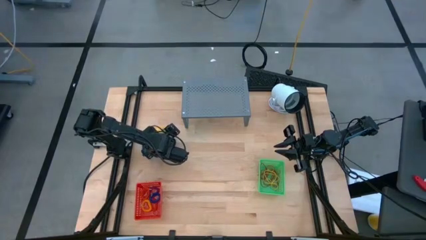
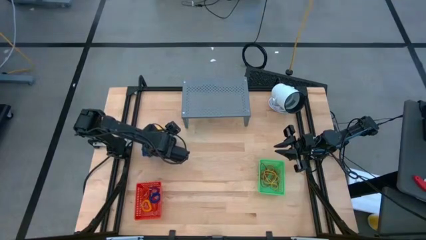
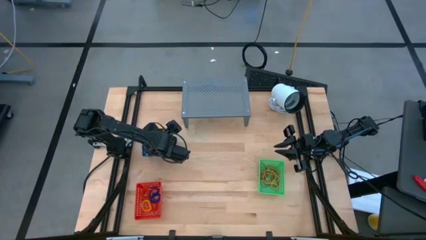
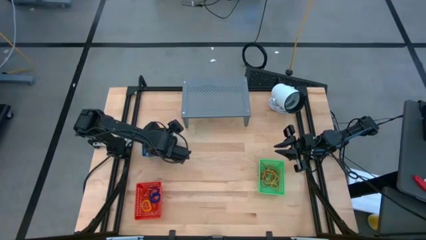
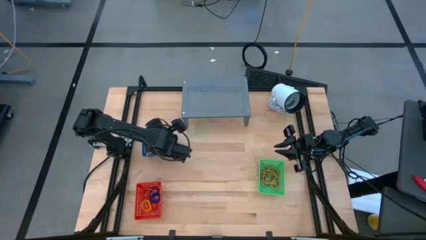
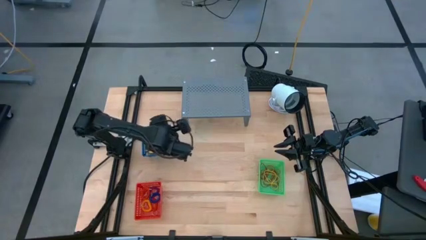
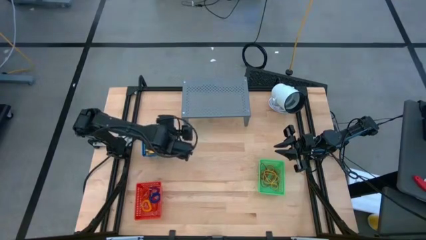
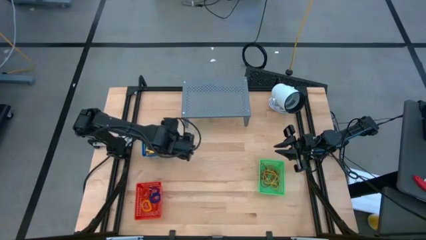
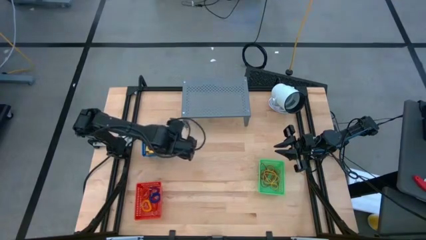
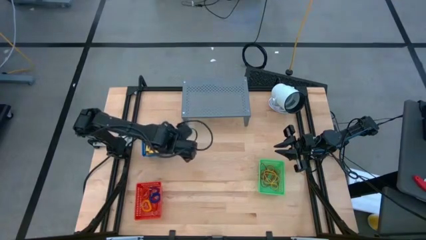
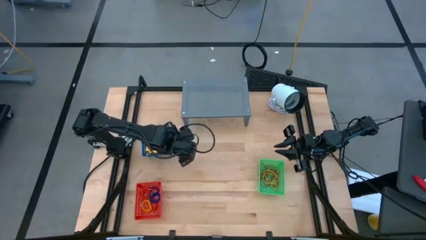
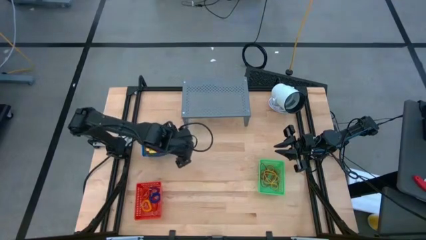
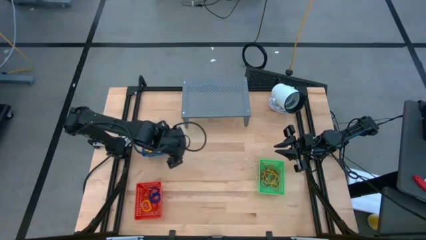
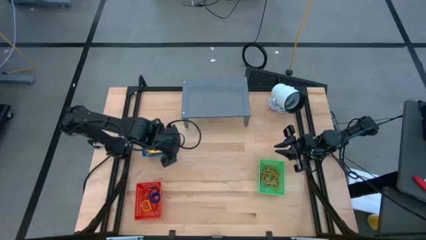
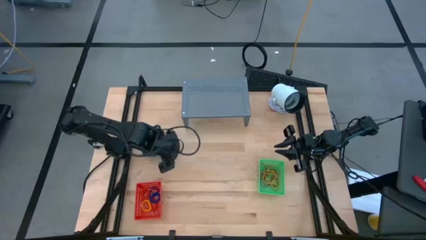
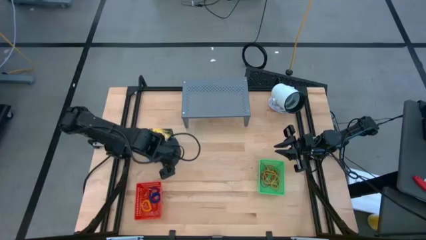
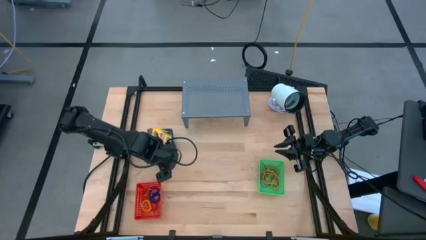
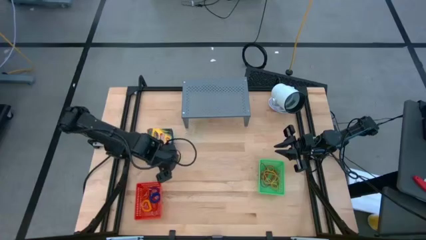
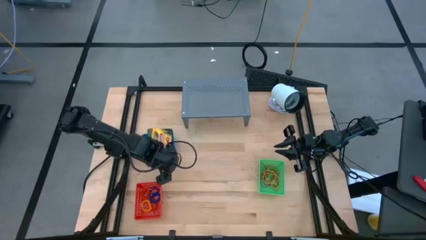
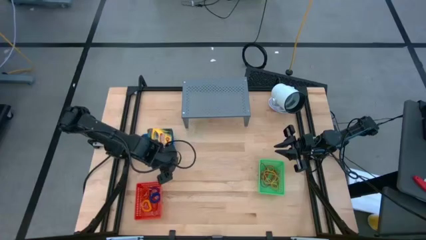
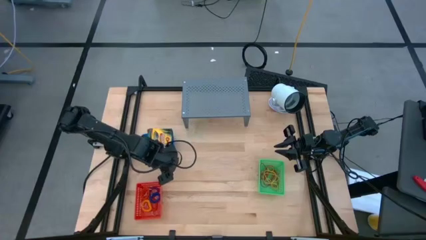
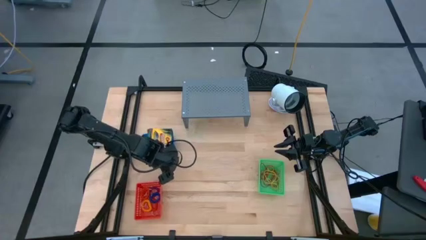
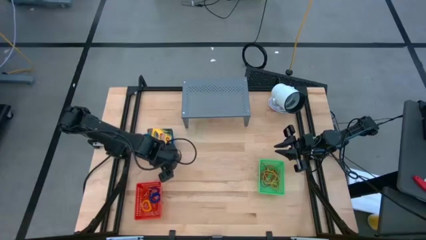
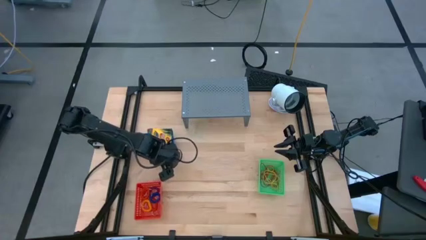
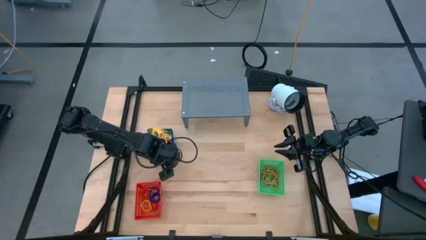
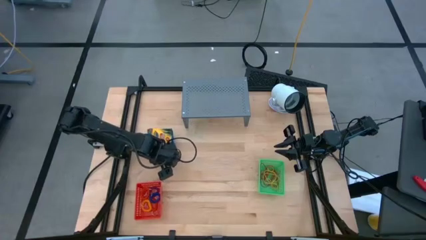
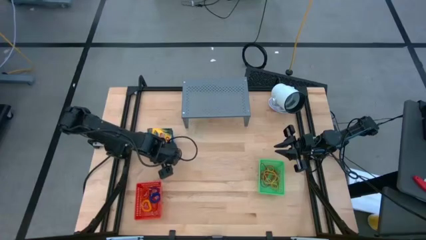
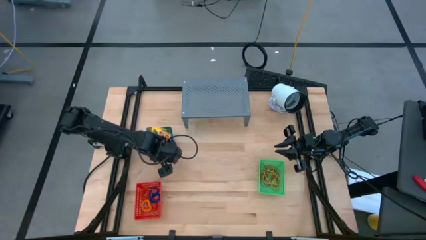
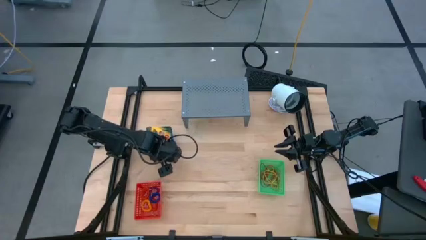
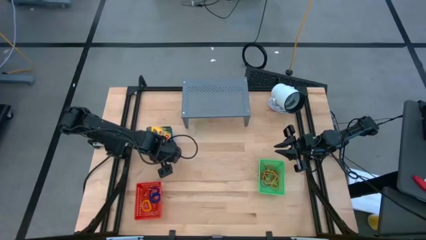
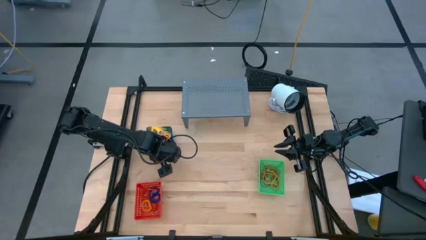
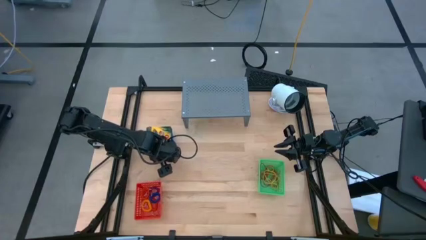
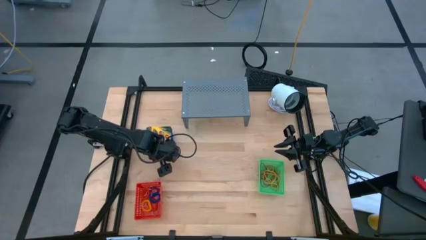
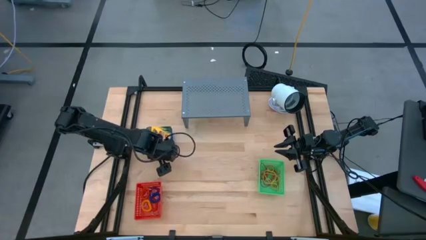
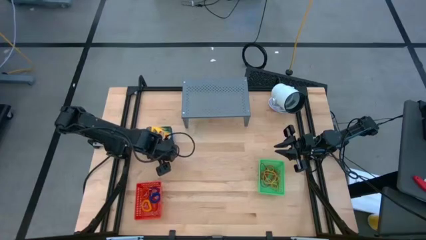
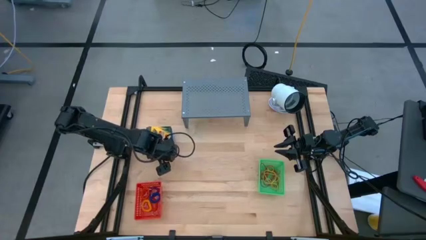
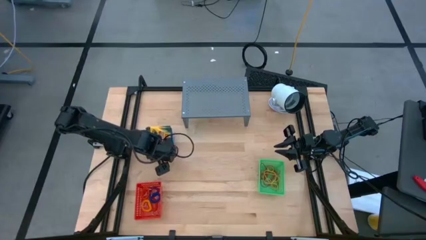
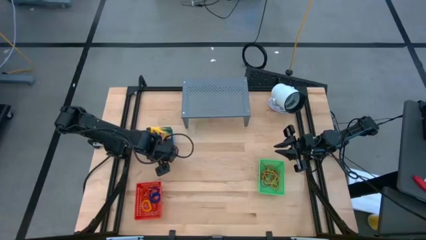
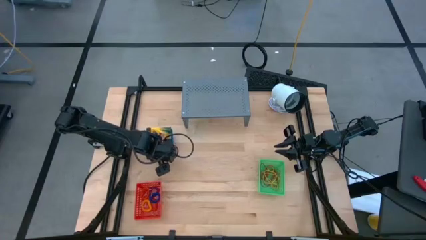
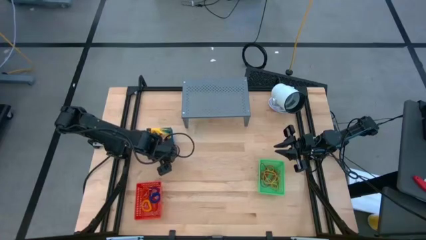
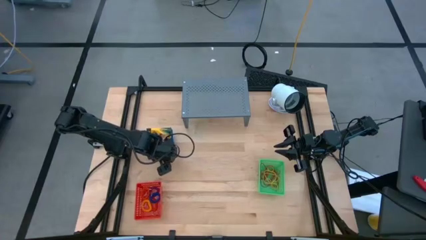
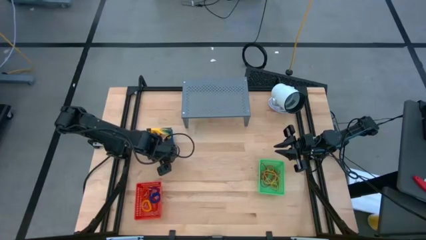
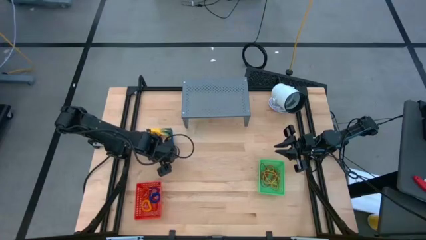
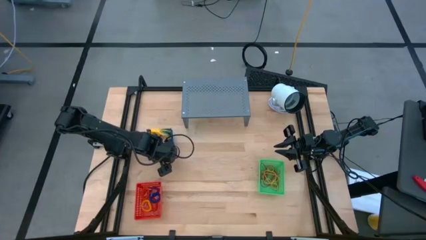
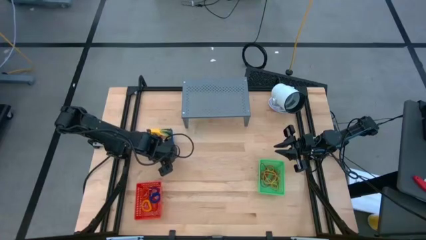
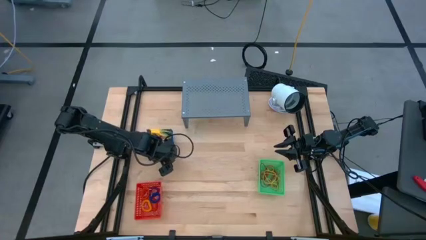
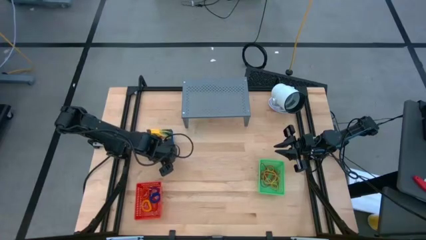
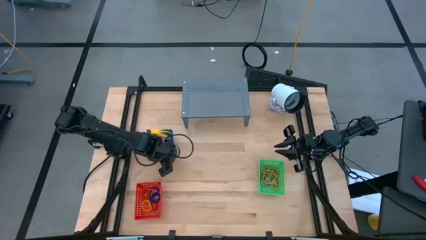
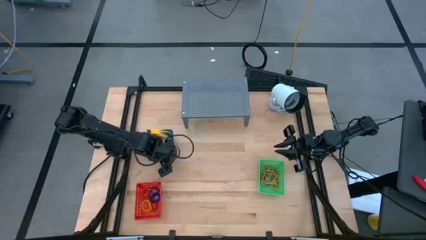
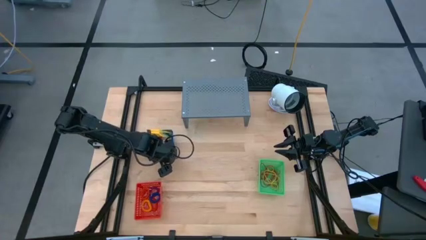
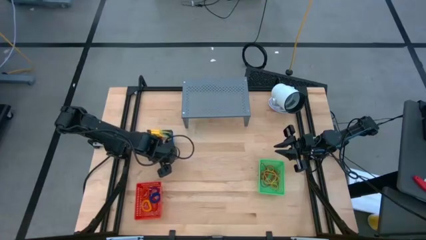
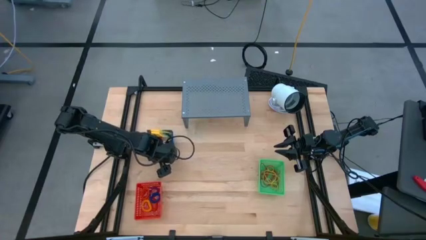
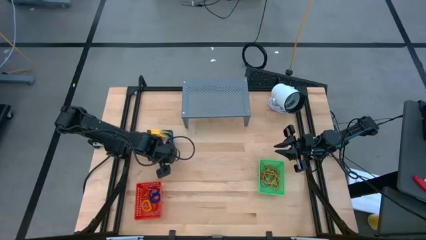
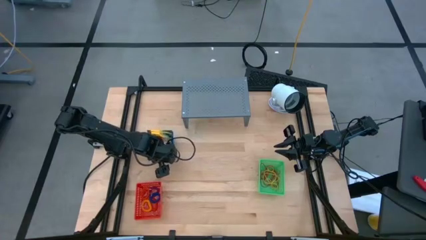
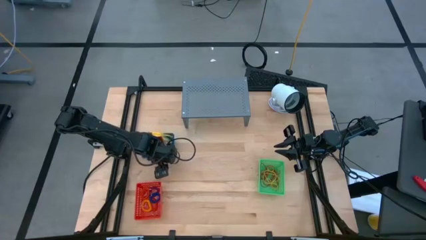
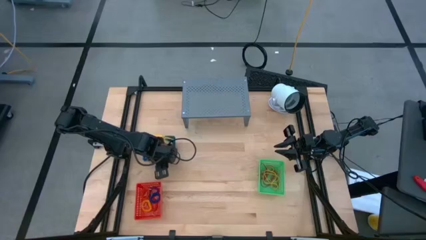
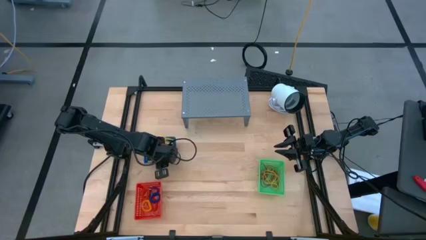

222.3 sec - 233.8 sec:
Task: Pick & Place Office Desk Supplies
Put the blue bin with crayon boxes on the shelf

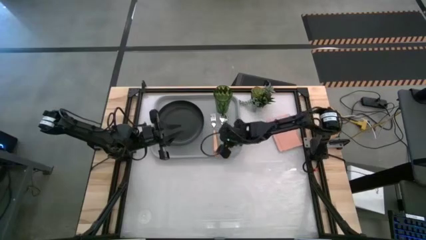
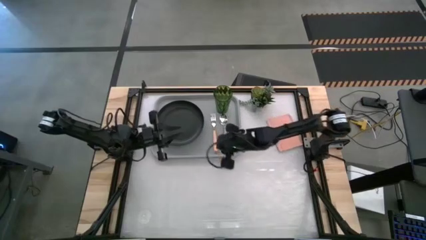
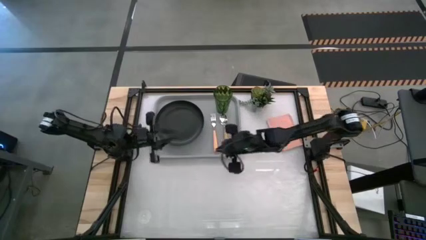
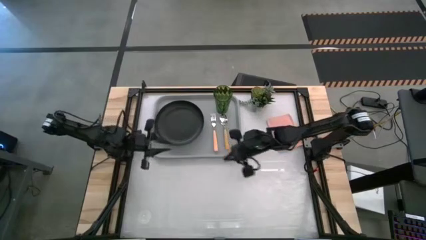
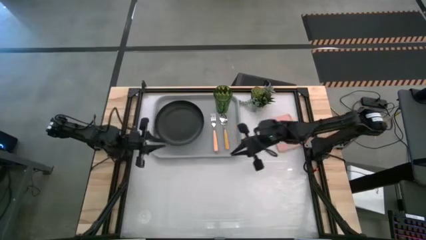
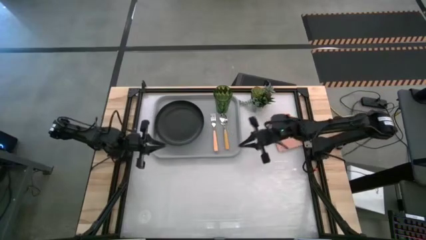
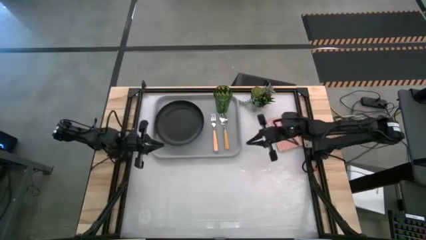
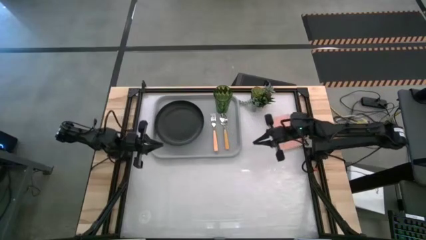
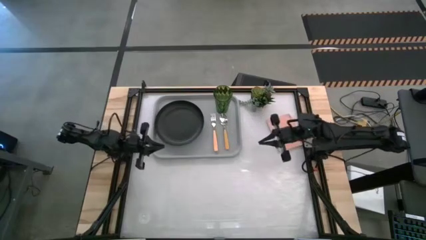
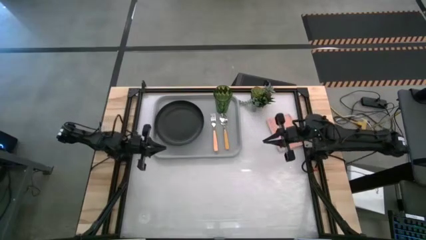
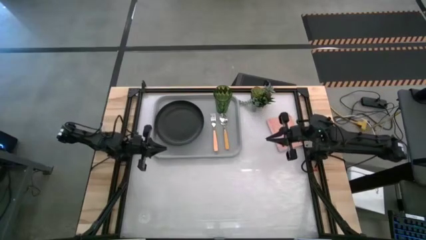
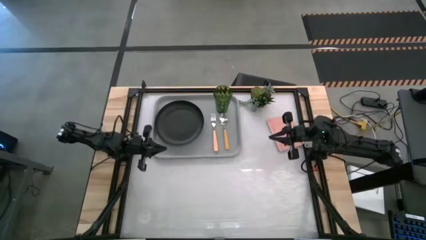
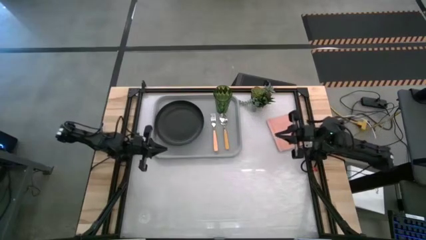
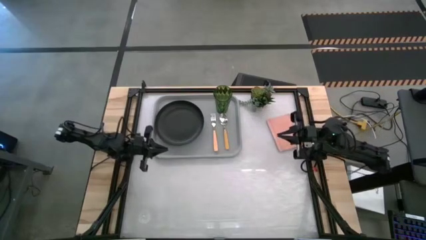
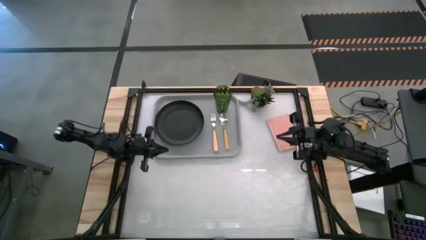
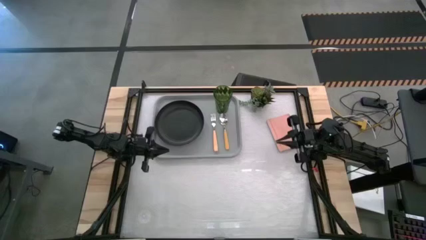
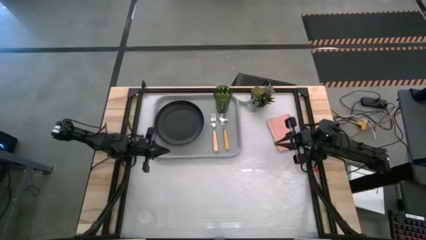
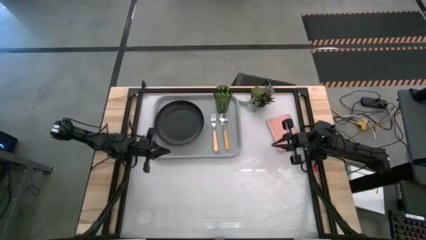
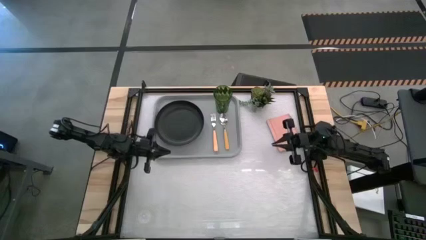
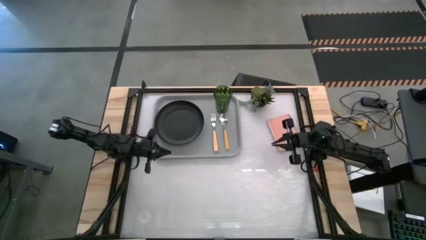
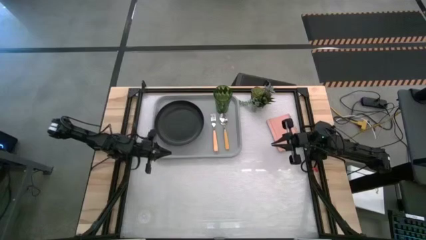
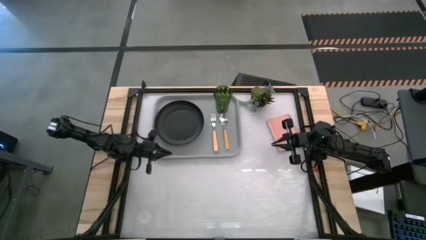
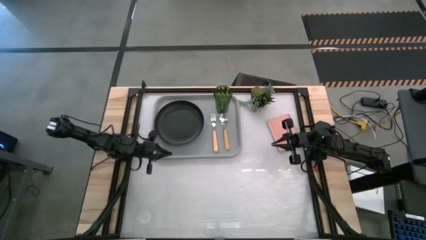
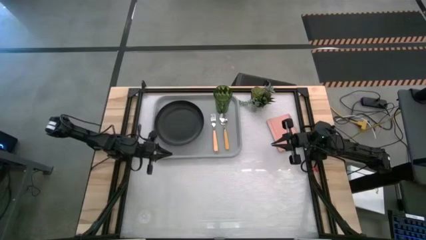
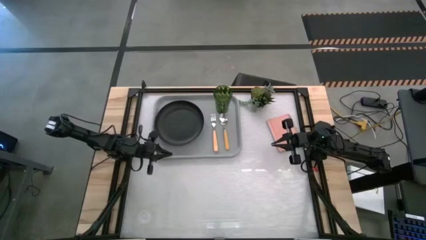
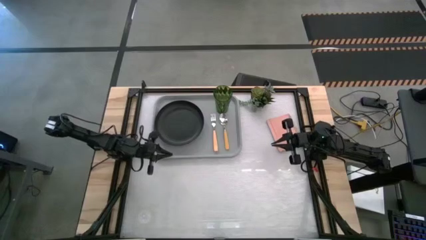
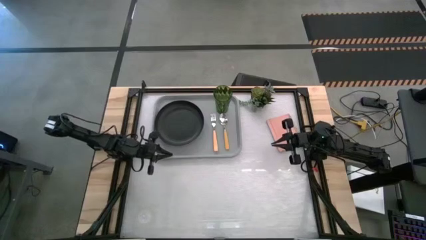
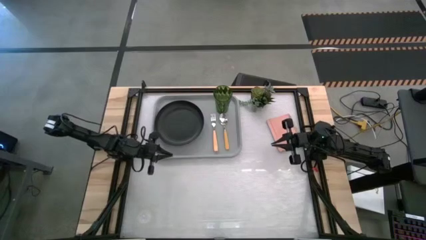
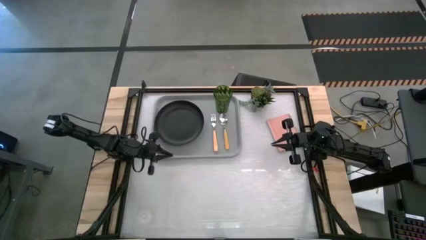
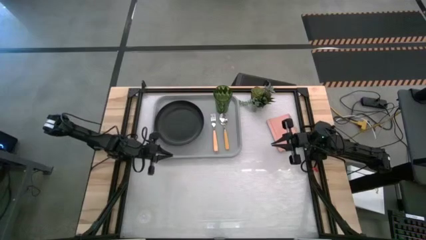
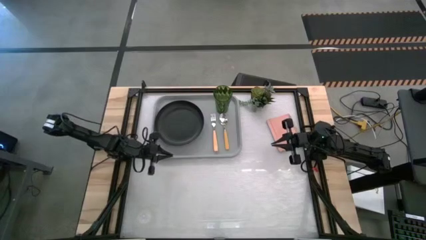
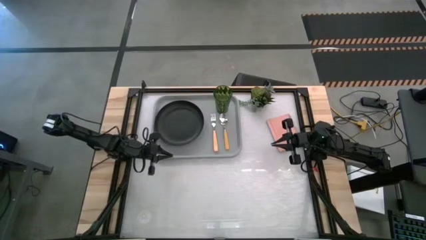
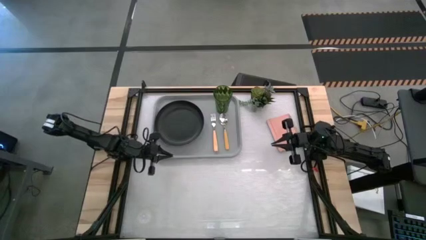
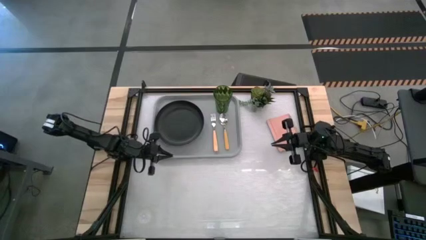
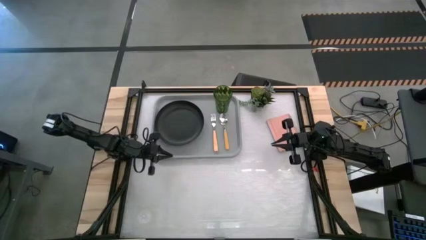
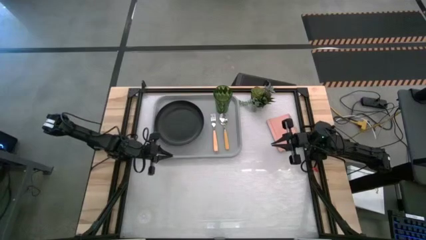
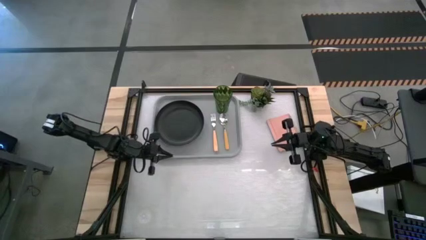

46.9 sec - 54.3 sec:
Task: Pick and place plate/cup/fork/spoon on tray
Return to Home Position
